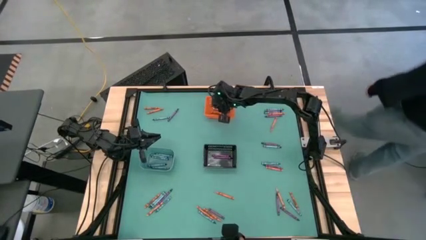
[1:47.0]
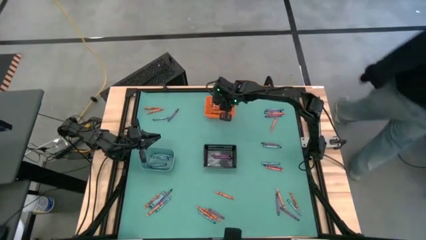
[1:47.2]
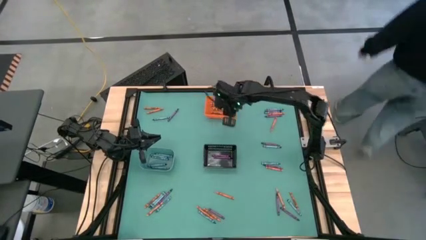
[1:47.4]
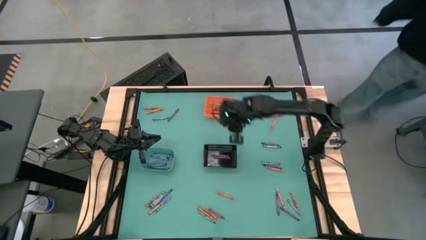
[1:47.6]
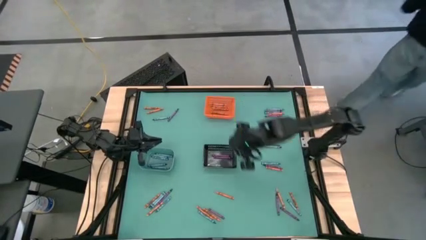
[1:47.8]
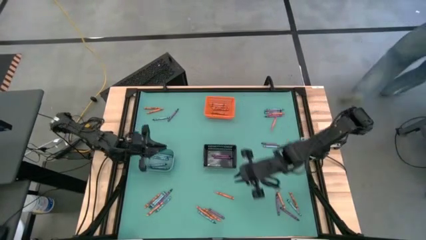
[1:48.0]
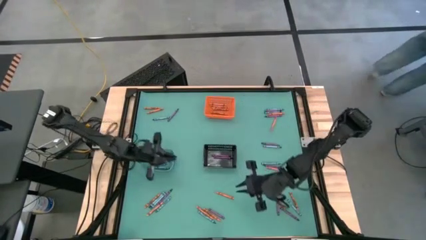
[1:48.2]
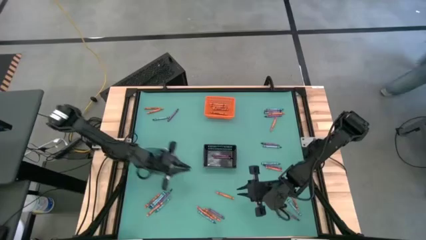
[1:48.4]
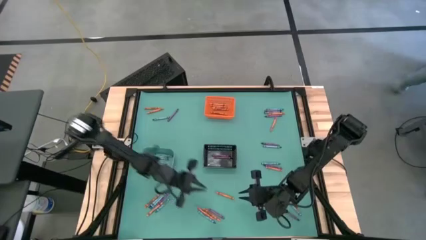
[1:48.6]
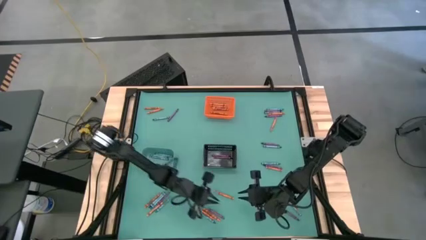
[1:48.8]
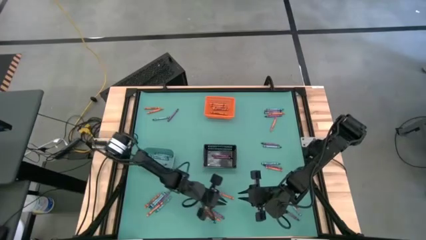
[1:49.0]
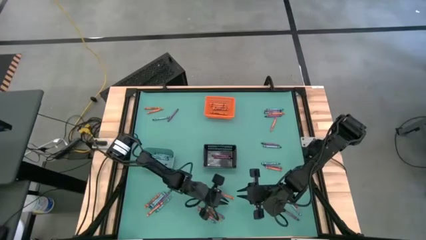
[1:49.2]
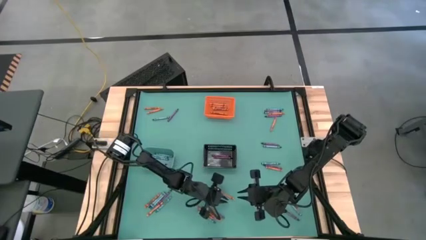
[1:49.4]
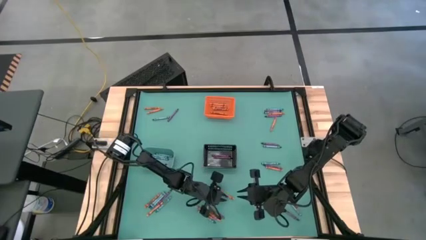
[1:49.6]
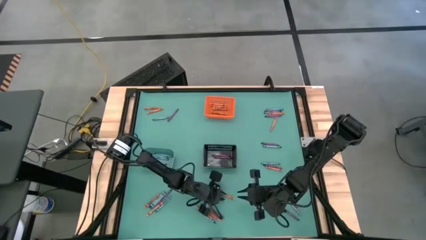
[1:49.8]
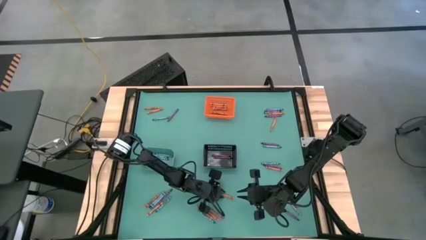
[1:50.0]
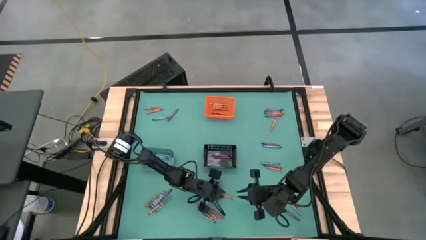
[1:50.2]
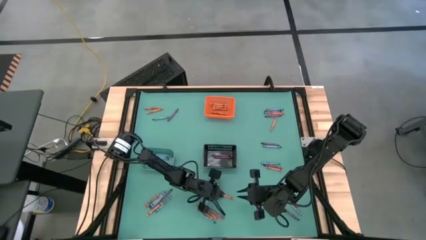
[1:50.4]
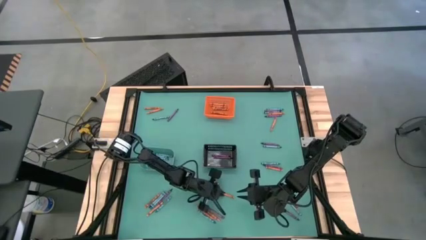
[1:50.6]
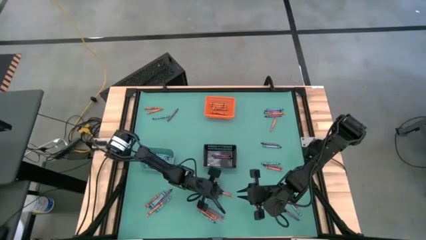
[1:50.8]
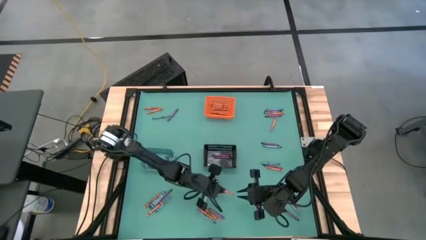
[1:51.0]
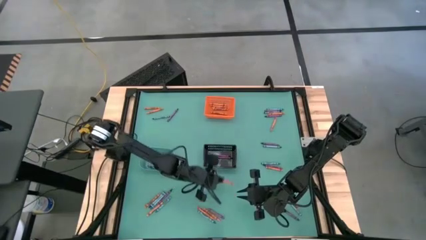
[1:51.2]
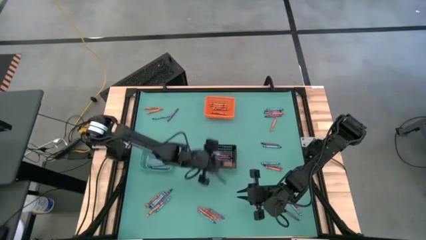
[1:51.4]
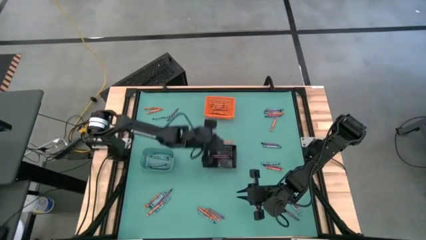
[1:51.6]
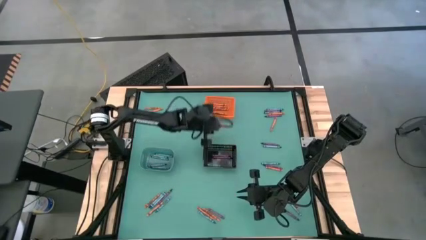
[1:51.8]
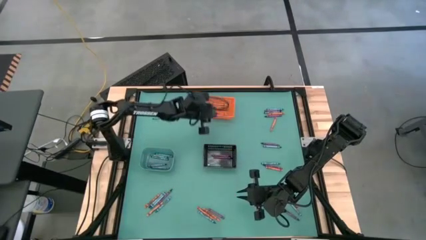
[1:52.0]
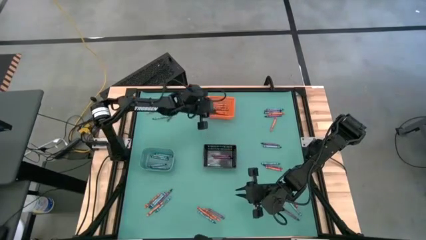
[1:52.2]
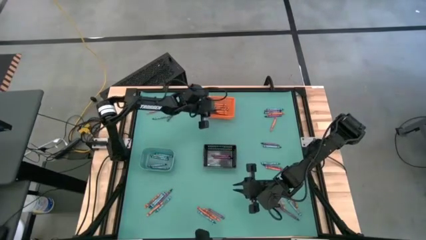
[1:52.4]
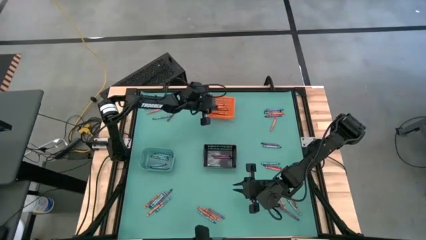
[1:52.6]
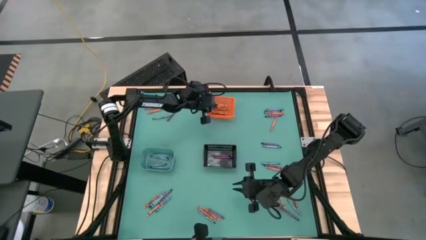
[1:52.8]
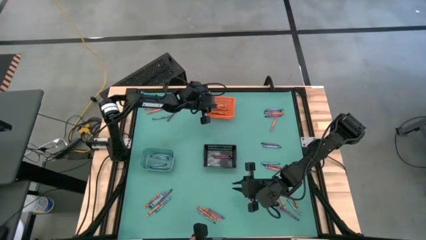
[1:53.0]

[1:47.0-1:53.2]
Task: Sort crayons
Put the orange crayon into the orange bin

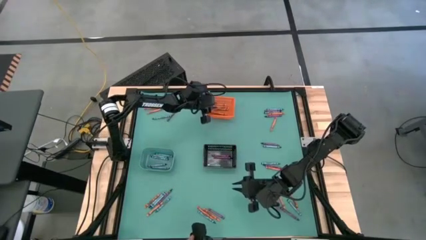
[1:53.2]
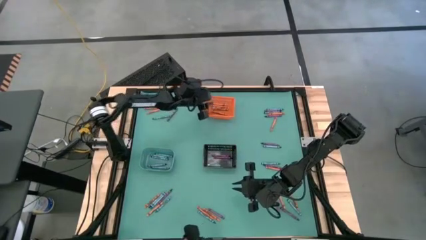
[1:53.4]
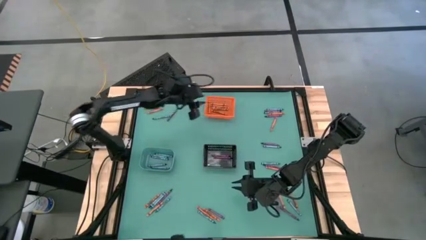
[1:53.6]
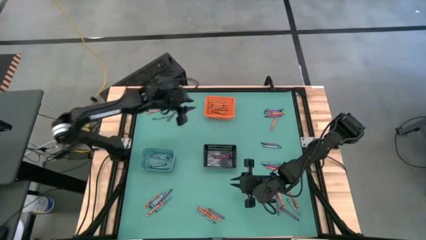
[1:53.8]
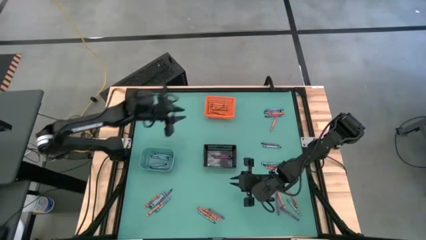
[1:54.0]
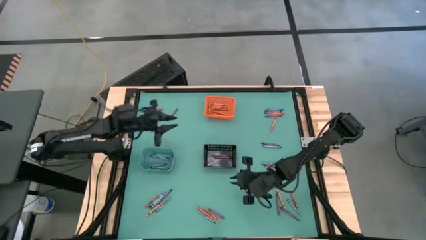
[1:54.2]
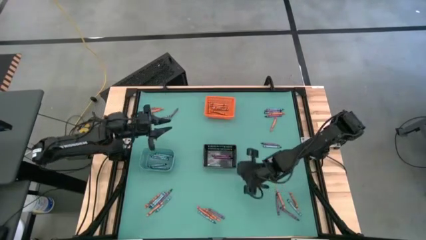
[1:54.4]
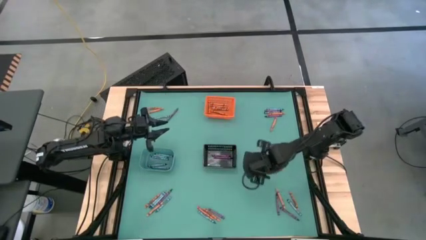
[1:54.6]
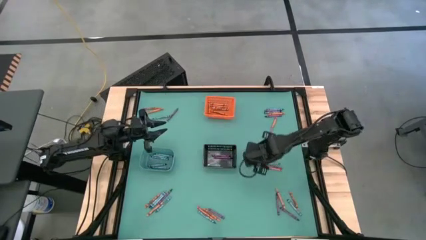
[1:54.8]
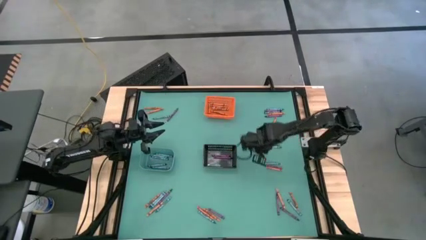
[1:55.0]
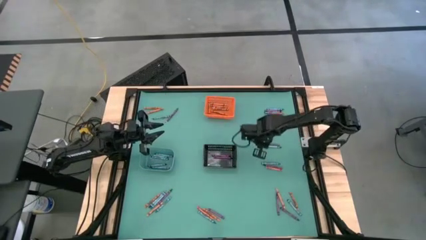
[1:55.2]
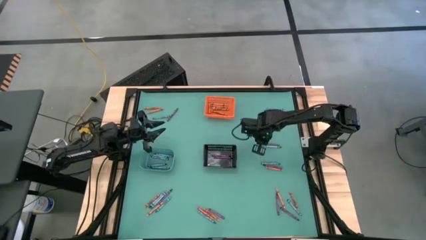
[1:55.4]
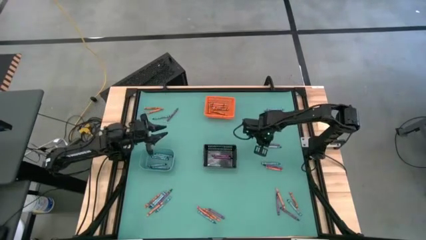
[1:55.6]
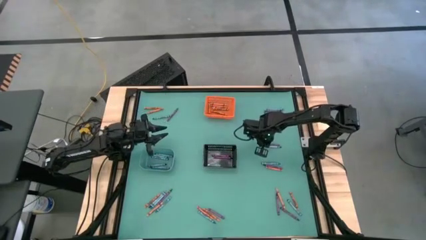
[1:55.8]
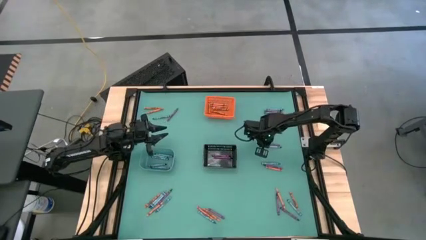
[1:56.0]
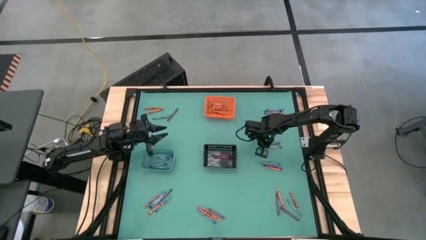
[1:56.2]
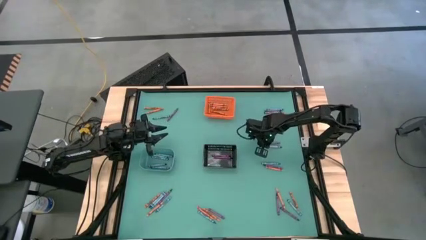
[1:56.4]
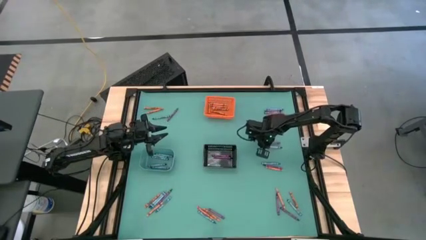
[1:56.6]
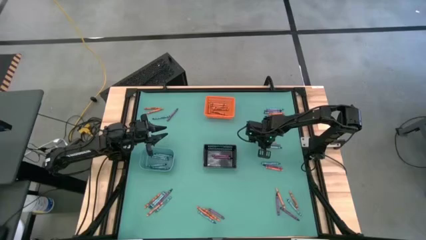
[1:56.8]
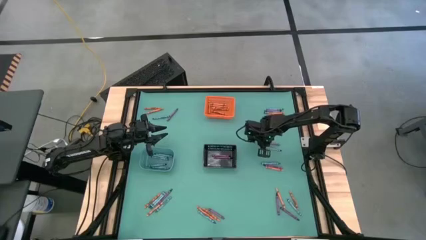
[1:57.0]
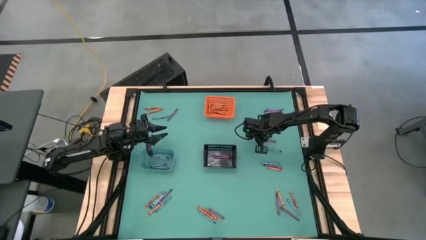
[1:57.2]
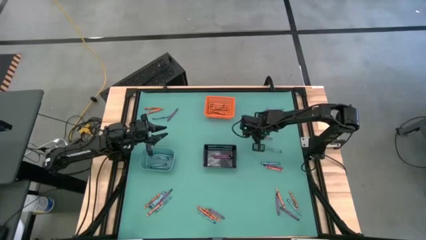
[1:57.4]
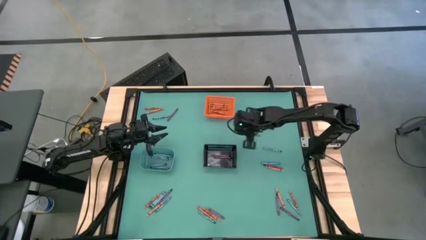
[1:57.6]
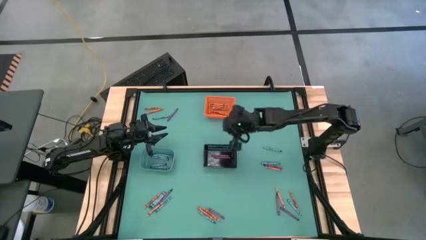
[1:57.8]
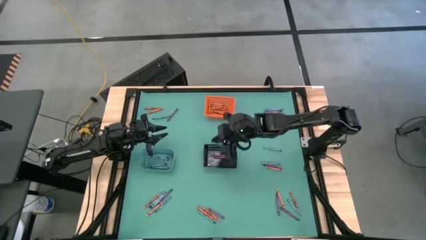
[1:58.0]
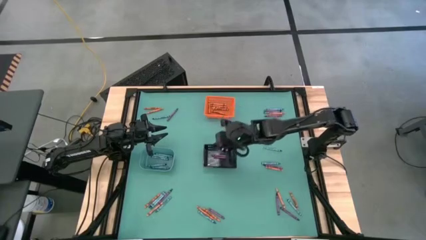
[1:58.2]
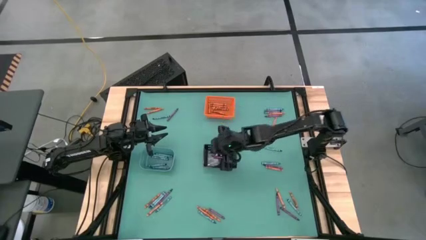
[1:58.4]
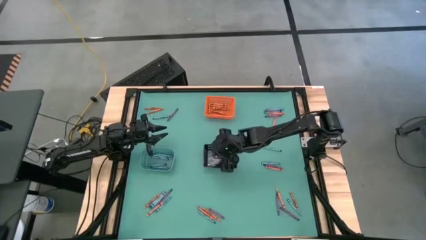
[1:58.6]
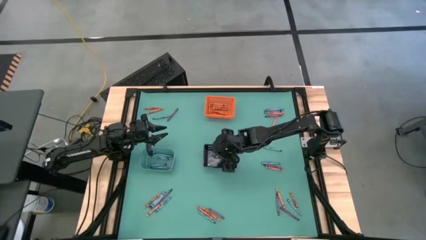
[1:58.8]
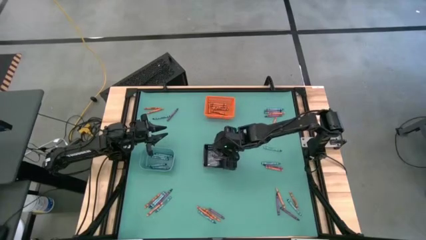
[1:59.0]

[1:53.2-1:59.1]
Put the violet crayon into the black bin

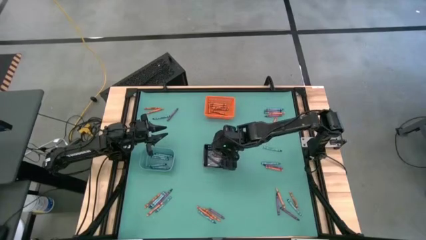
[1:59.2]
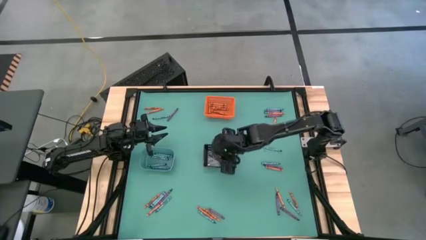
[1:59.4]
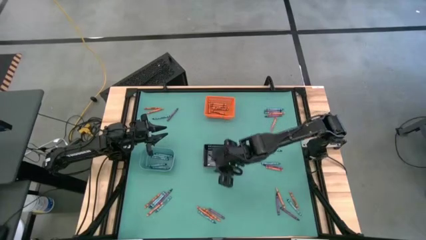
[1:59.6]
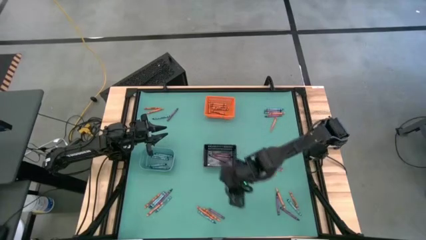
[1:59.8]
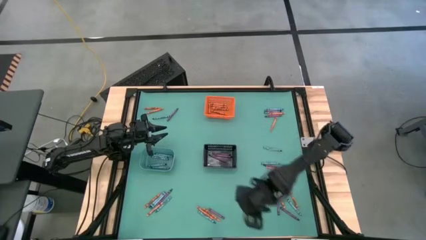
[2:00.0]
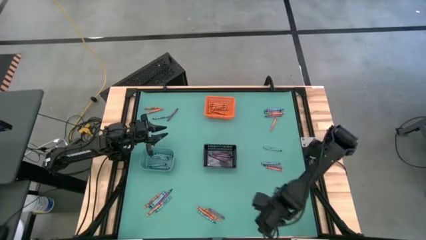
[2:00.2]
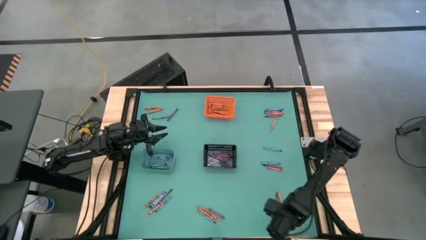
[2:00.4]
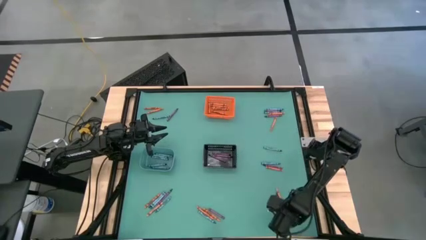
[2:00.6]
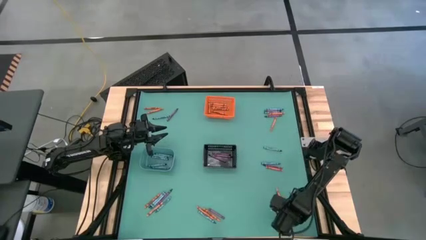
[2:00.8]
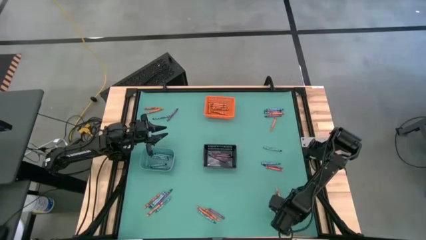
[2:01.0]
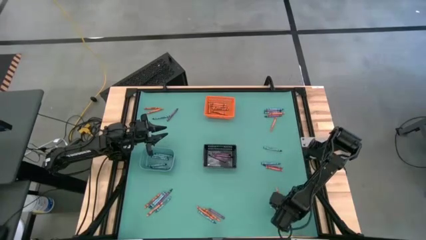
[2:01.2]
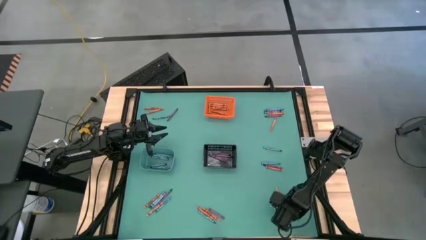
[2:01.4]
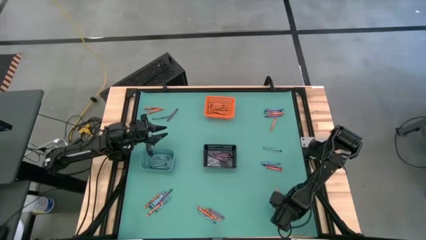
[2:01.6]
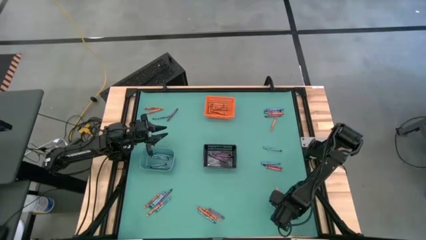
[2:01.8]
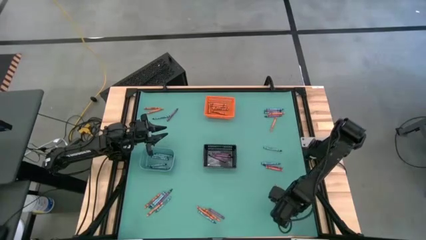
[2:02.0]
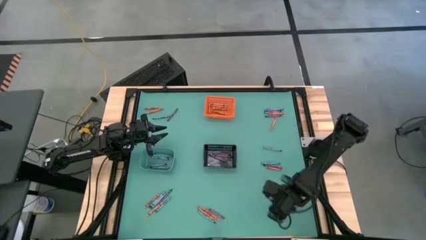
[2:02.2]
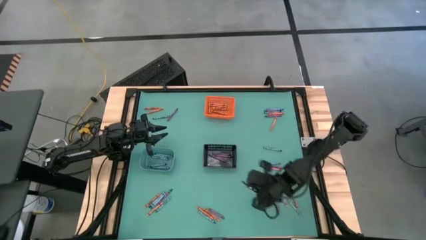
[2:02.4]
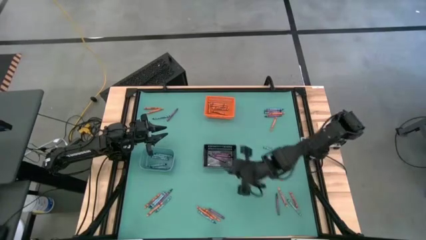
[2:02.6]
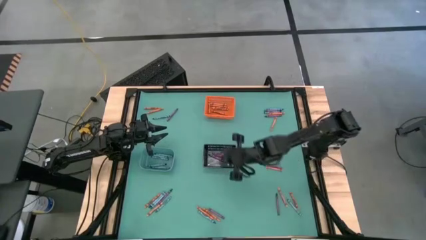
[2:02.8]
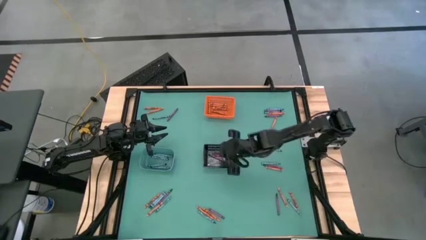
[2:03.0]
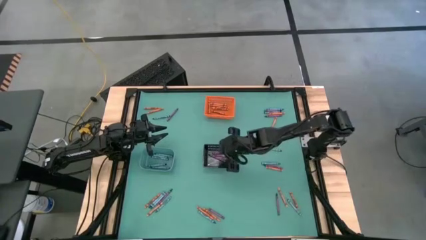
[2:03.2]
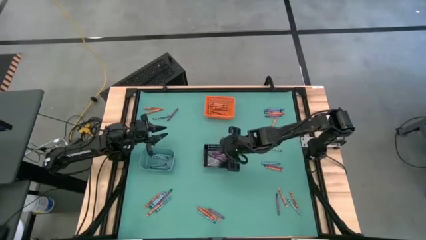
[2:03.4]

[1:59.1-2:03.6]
Put the violet crayon into the black bin
